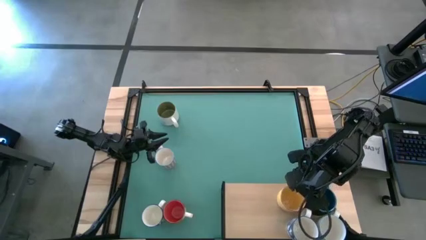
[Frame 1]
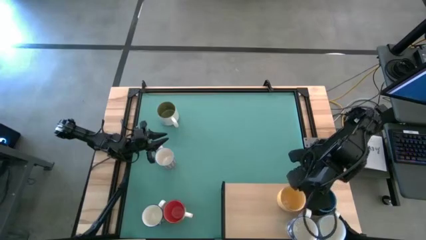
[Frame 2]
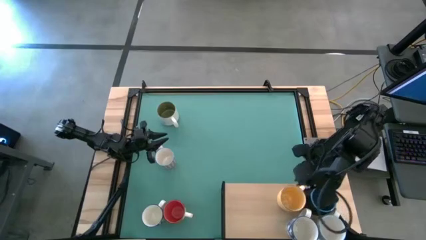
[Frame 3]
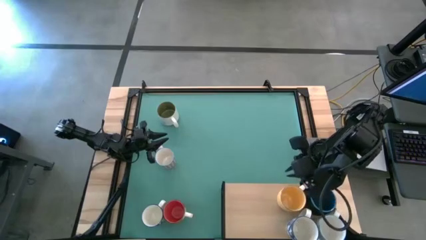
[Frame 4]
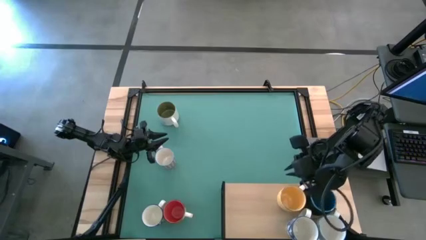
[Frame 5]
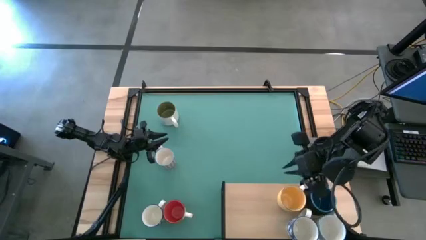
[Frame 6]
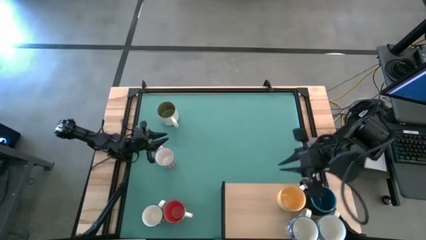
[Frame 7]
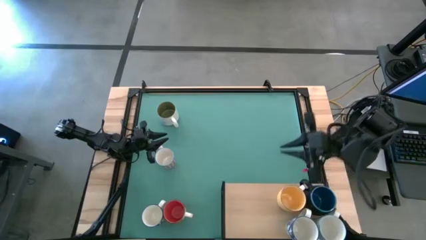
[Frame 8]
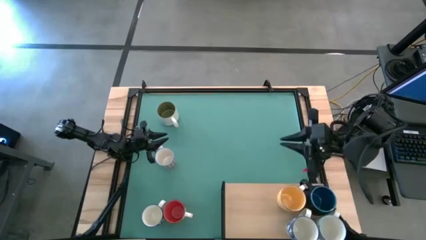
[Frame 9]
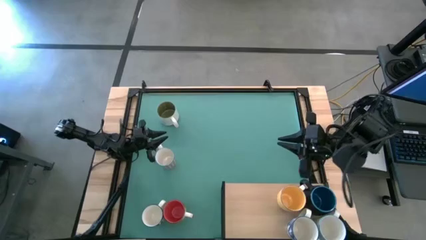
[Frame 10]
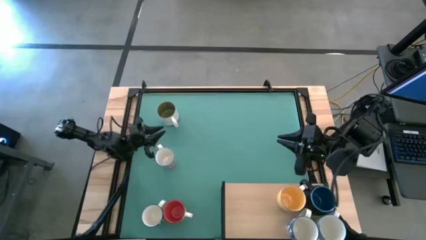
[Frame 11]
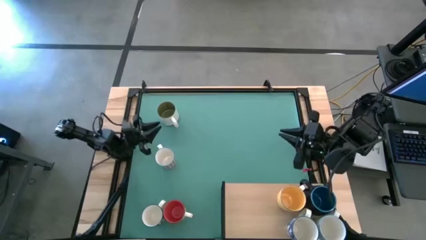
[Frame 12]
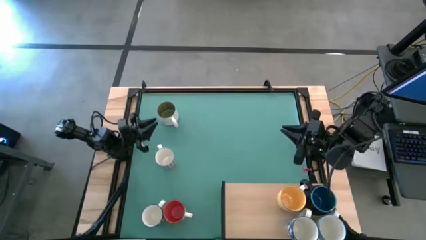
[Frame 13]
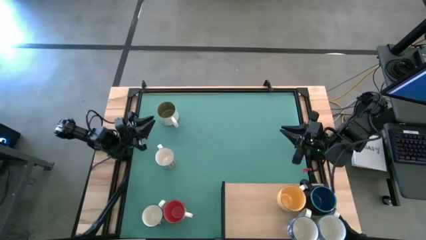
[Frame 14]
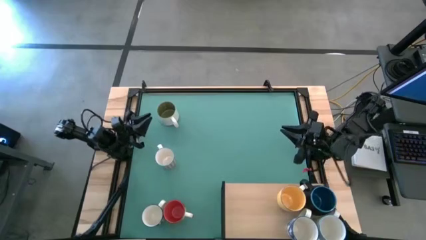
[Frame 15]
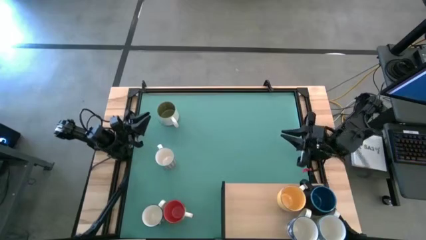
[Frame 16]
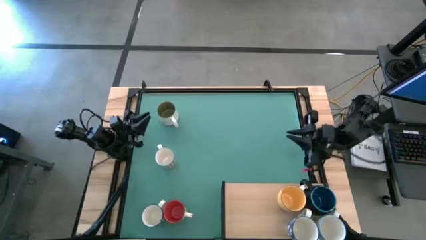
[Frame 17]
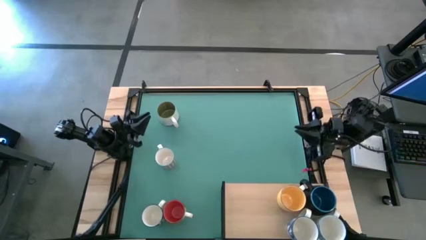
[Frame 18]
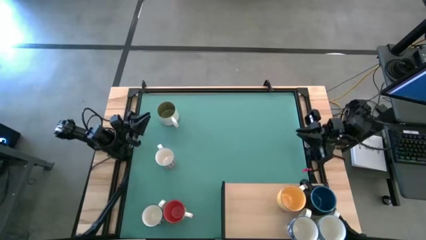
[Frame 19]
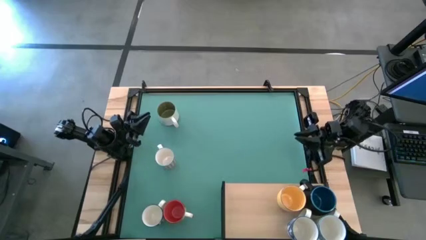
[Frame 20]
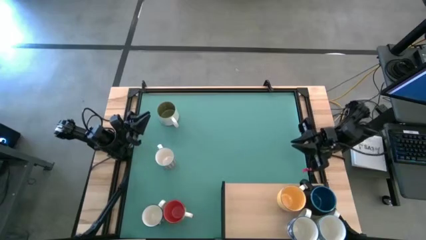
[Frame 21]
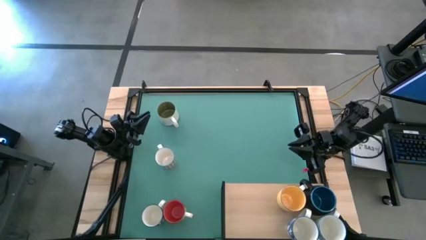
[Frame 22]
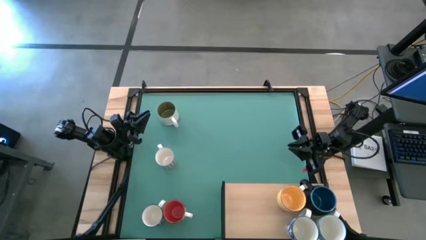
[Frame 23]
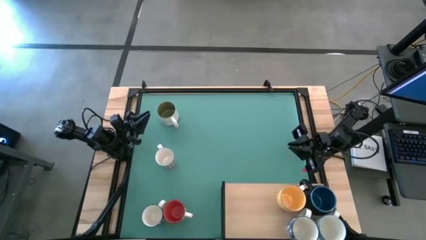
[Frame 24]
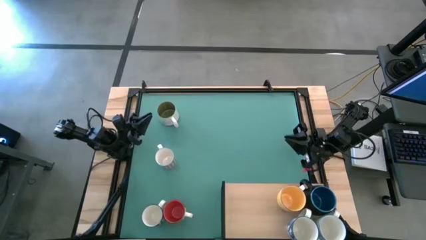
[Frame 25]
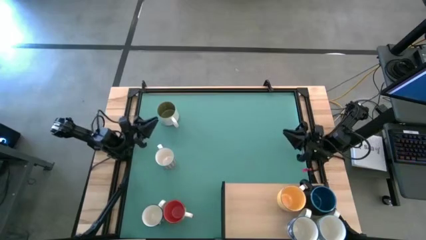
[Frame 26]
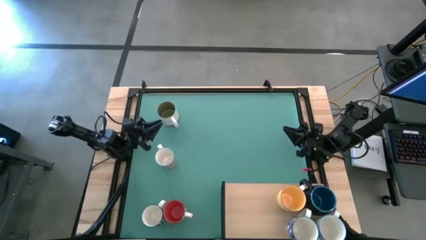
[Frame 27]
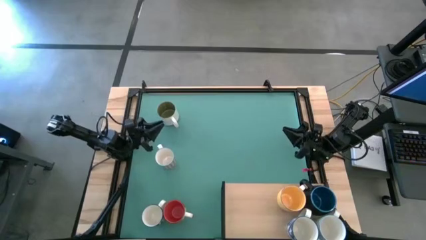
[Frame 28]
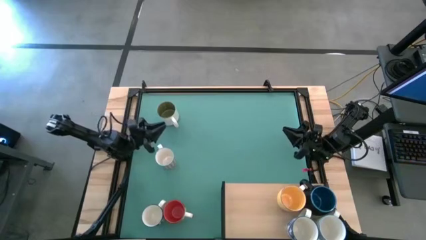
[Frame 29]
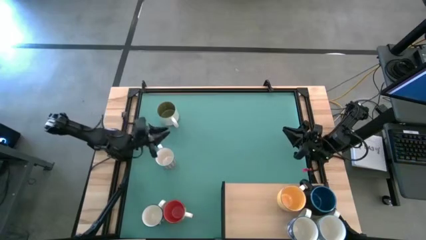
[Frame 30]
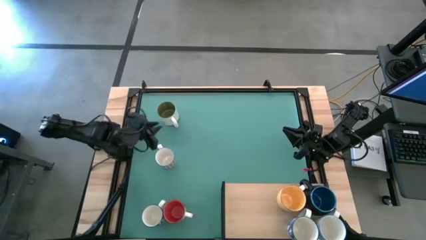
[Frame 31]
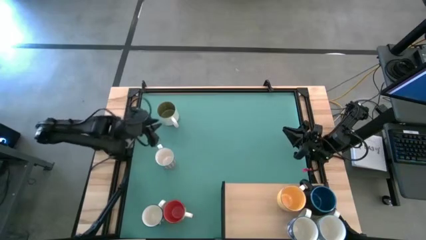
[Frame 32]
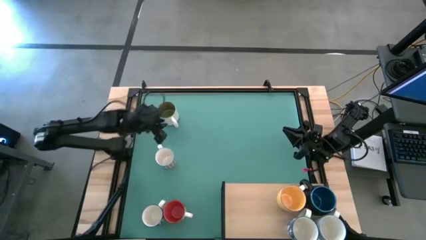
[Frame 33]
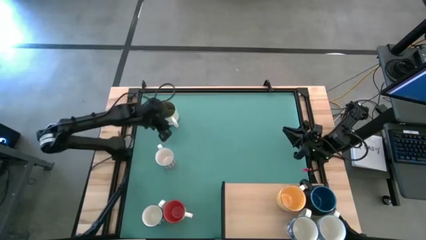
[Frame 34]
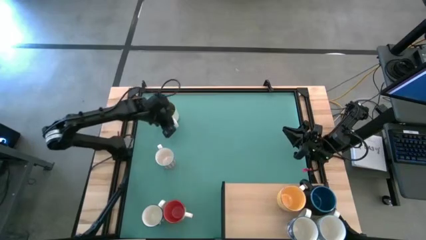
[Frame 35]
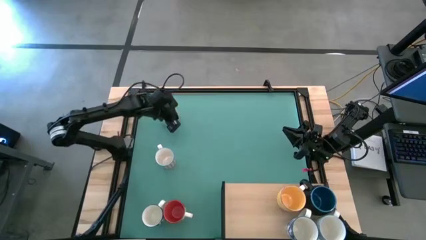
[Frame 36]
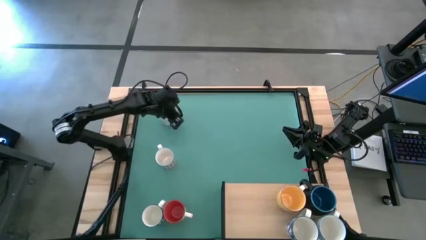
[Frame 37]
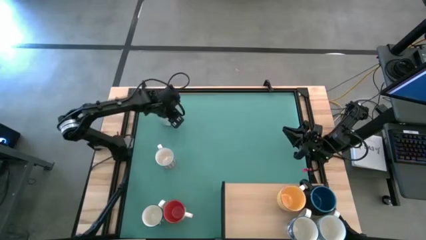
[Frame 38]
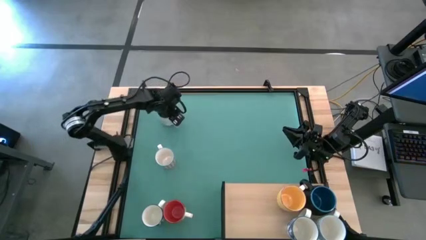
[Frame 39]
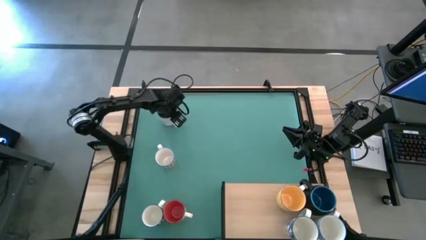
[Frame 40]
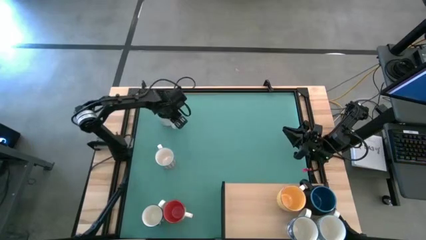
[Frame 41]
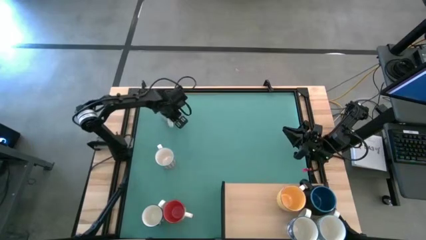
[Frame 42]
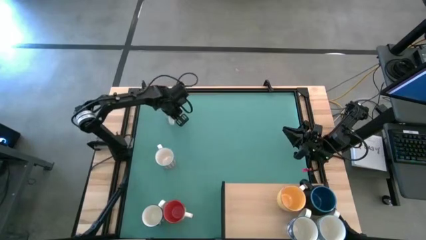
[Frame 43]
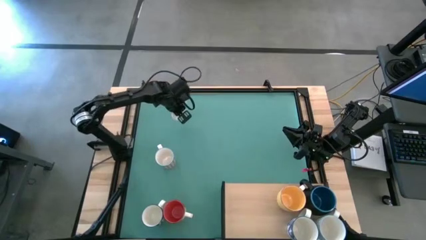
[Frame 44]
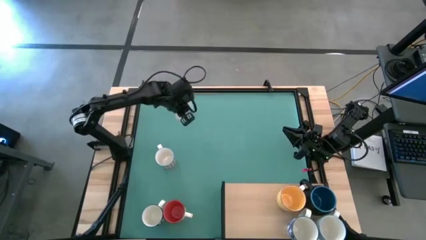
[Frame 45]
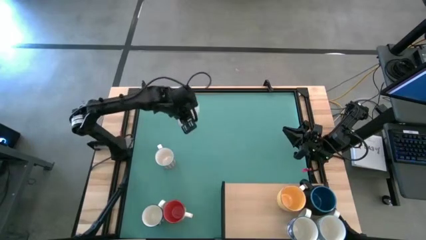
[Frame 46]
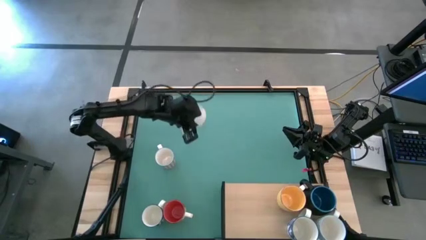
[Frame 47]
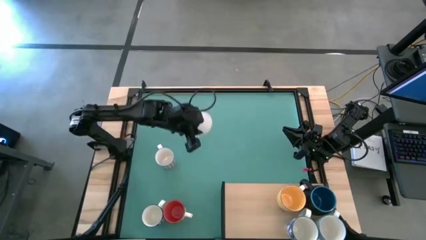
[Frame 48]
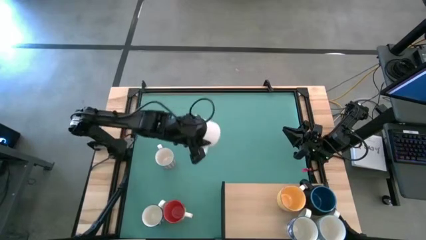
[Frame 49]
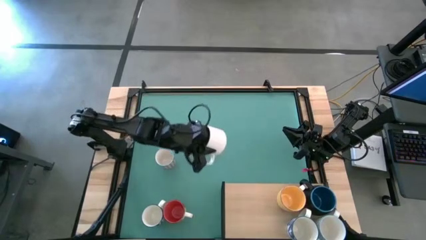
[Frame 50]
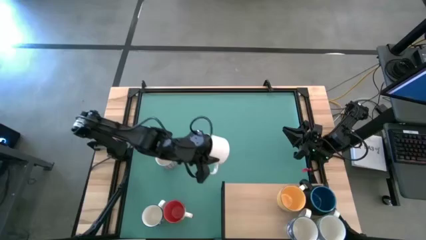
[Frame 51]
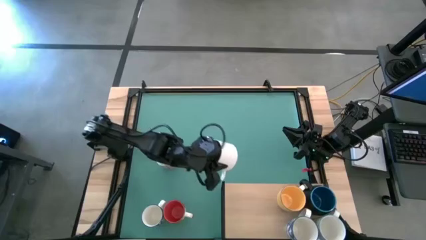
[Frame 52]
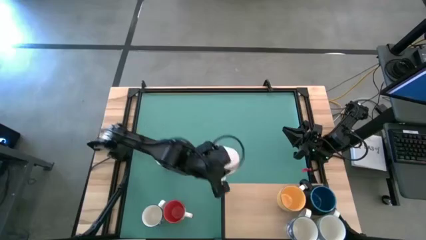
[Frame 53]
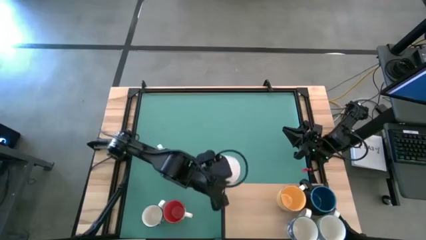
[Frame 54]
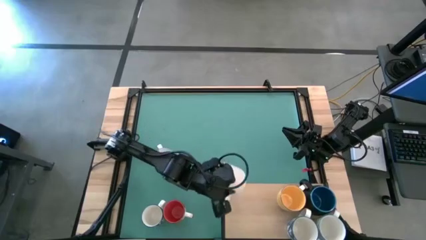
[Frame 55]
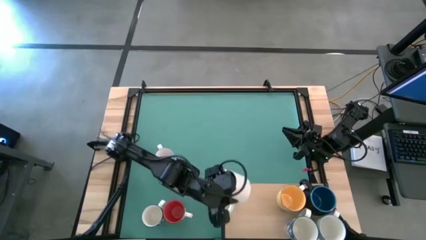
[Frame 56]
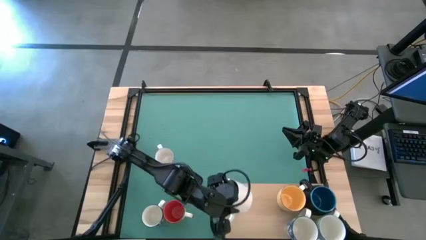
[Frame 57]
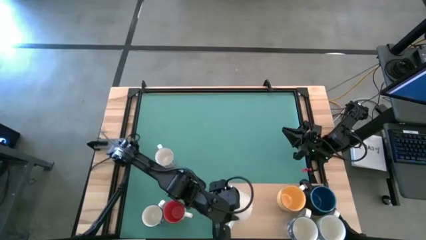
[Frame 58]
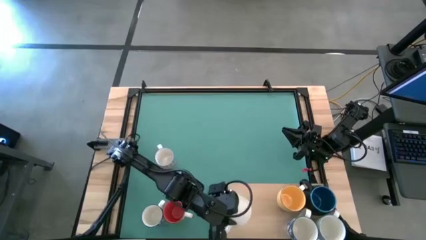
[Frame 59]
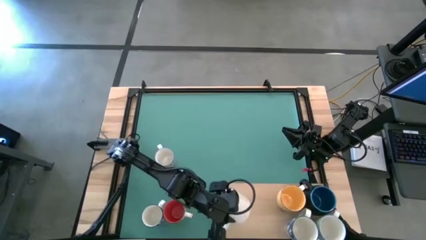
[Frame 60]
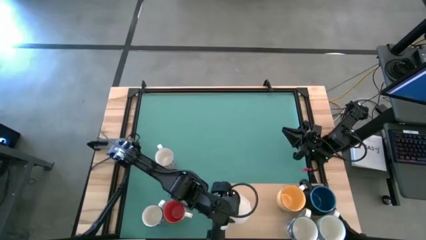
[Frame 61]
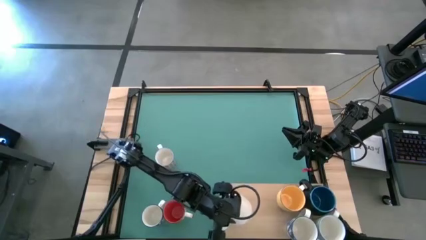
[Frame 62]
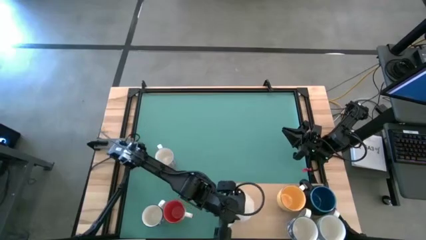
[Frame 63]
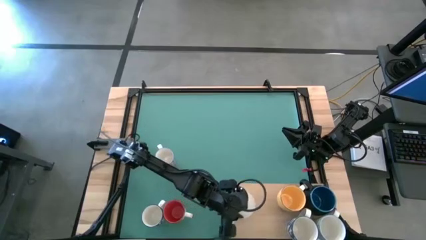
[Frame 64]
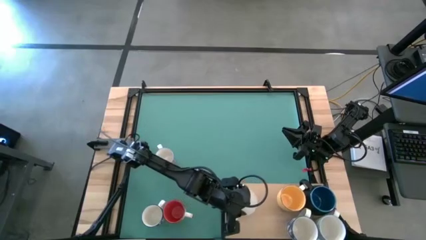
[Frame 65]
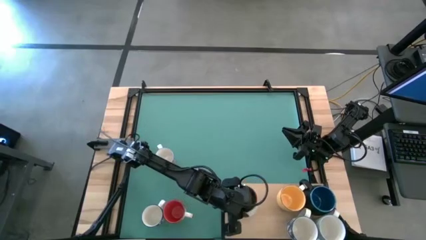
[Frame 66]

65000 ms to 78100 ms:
Task: Place coffee mugs
Put the green mug on the shelf
